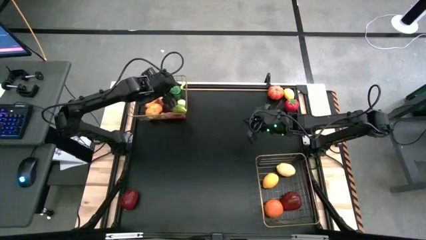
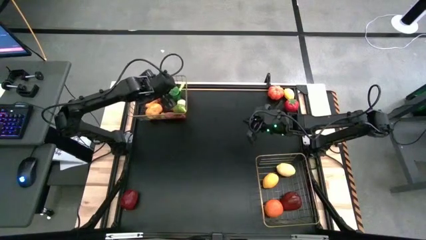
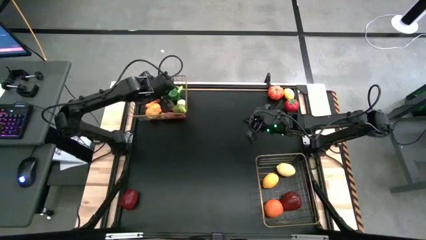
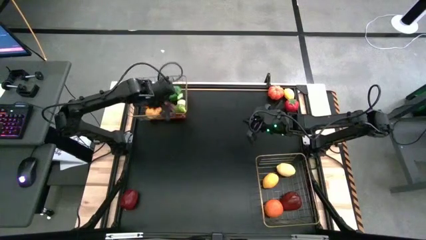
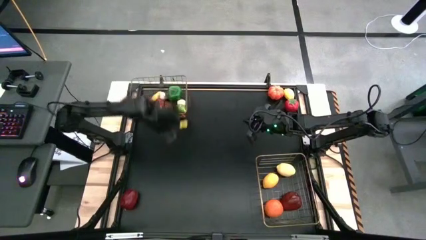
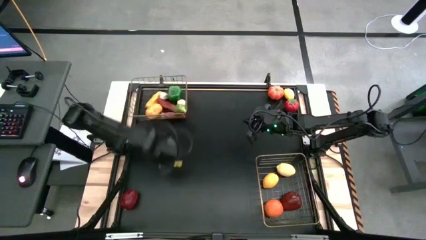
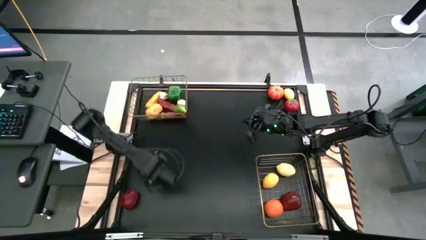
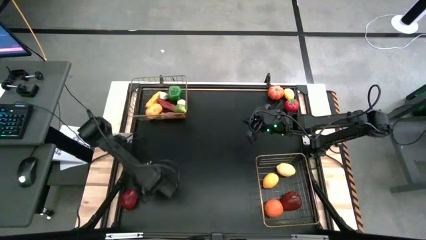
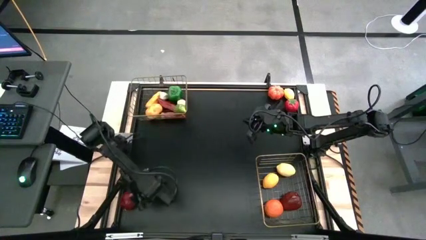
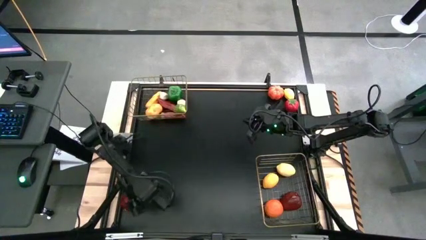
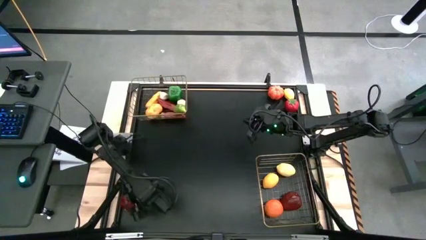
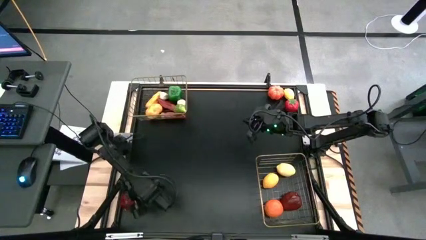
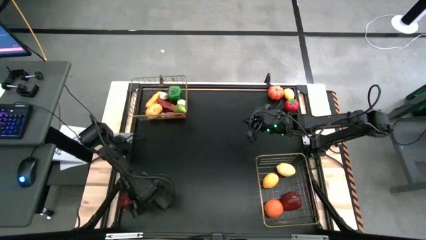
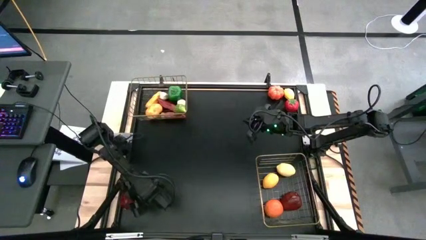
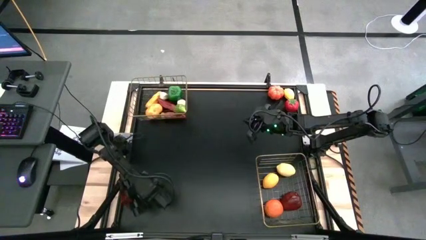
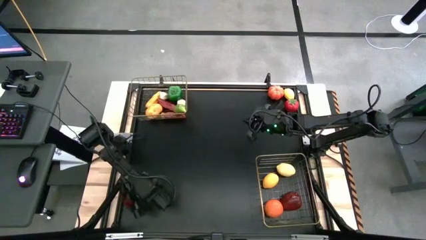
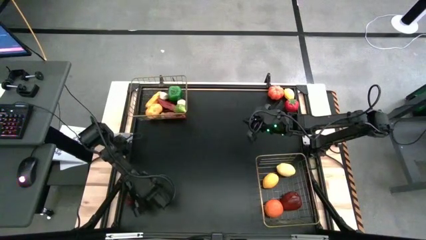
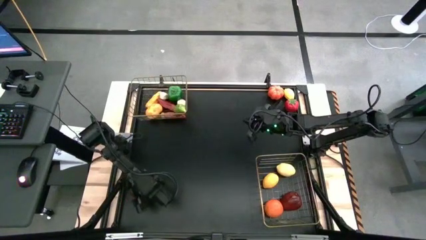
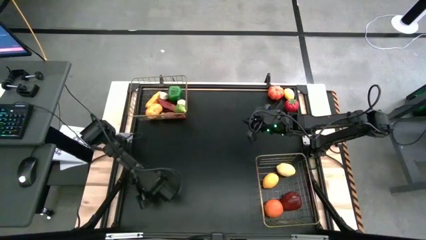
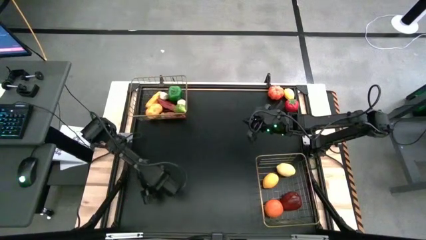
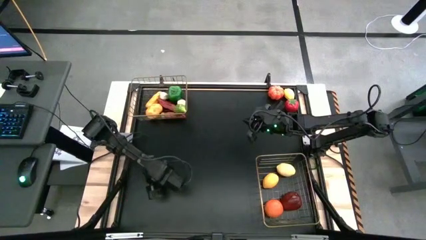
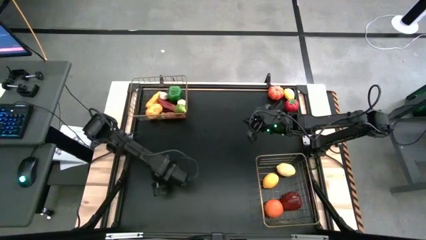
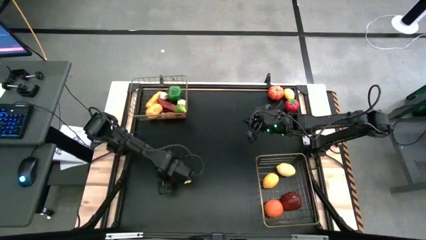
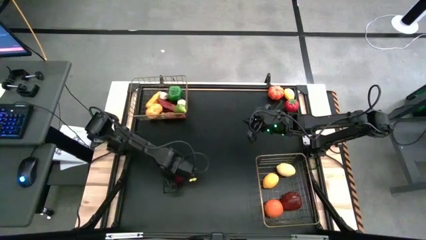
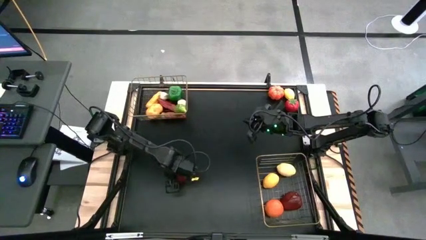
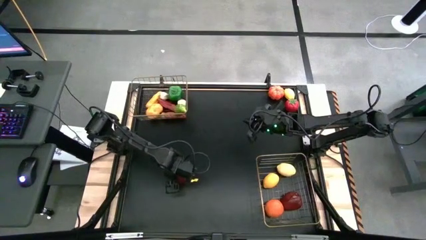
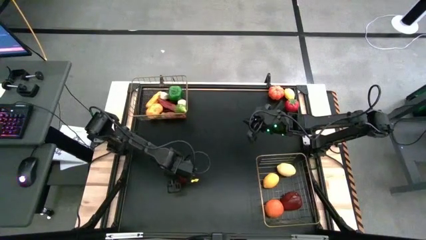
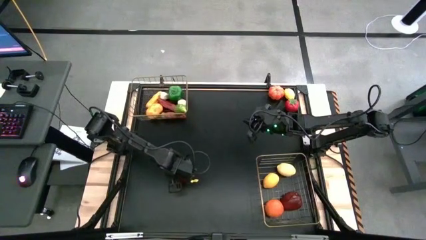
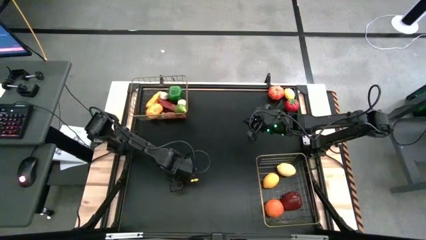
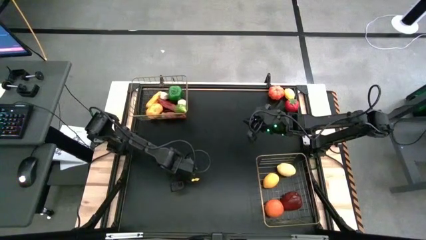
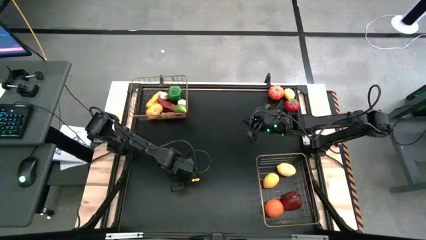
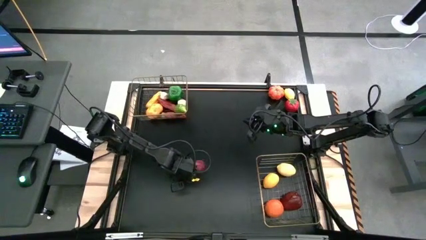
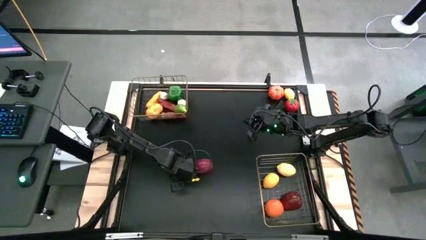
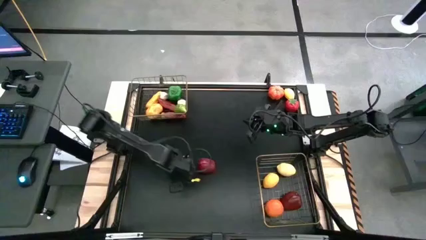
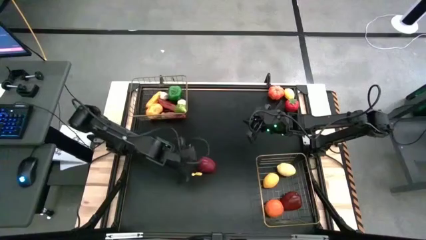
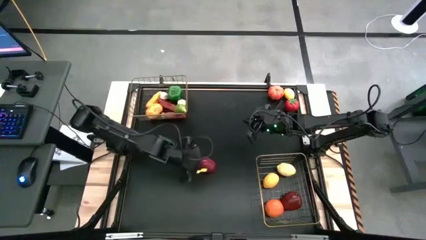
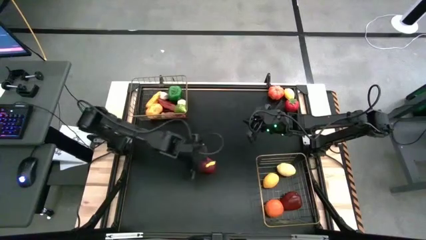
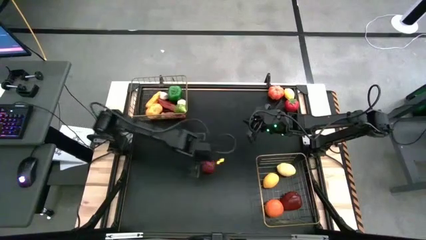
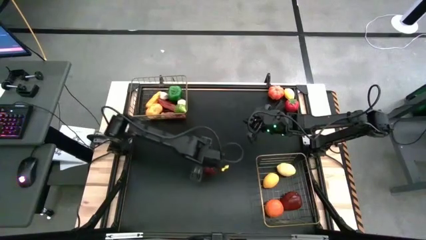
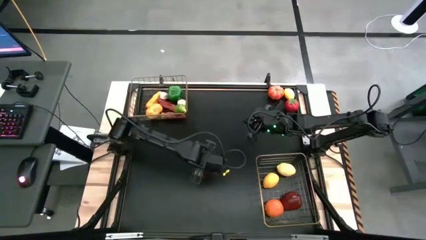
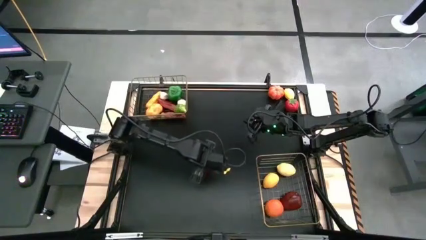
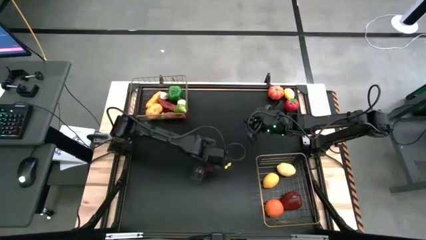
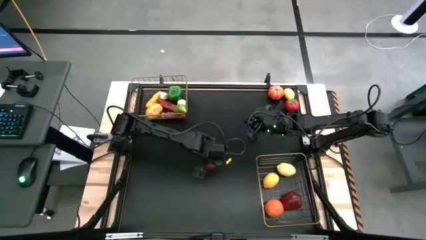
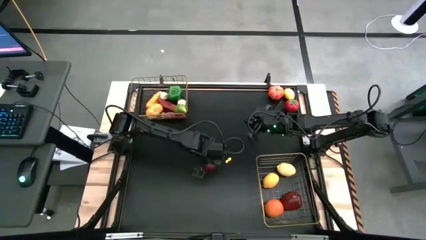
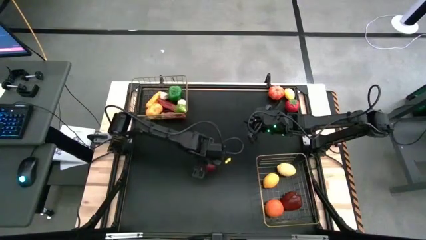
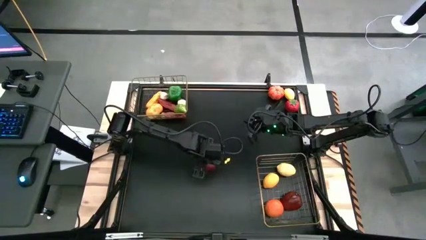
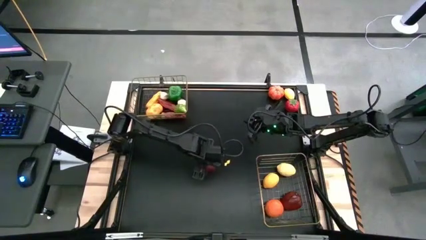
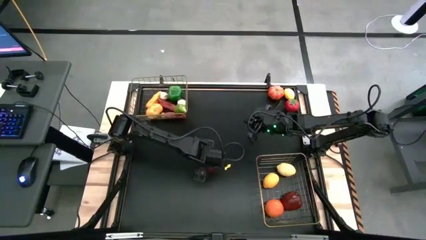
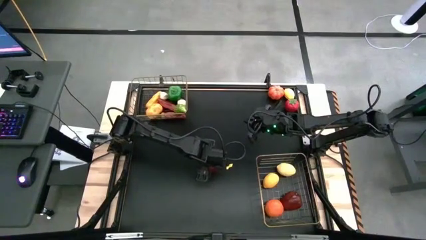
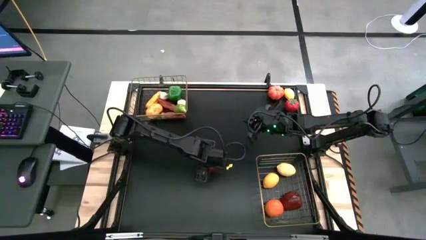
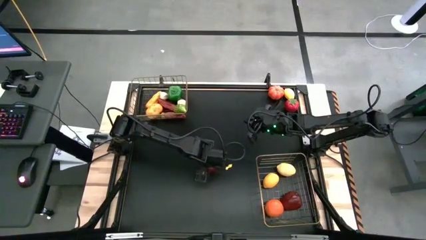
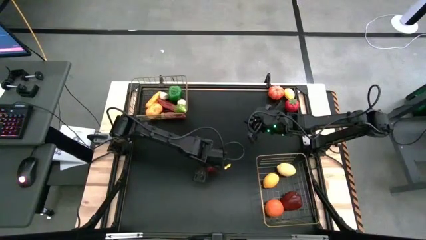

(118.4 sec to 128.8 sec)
Task: Sort produce into baskets
Put the red apple into the bottom wire basket

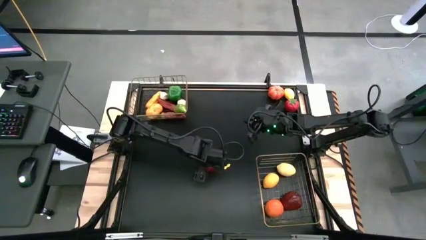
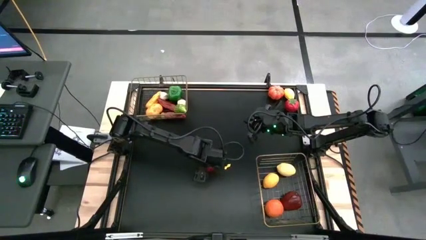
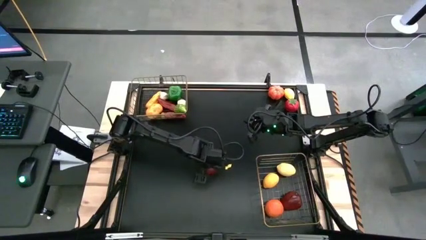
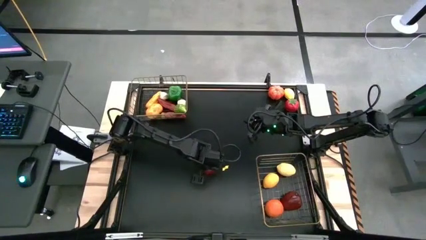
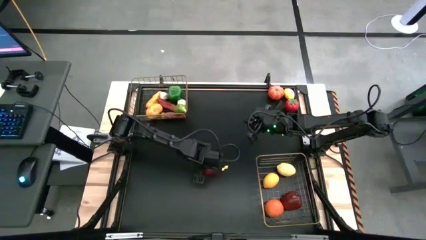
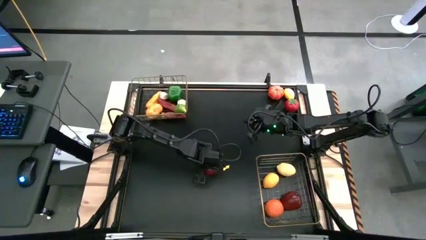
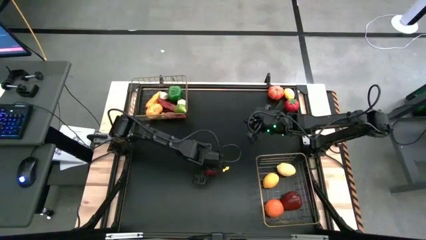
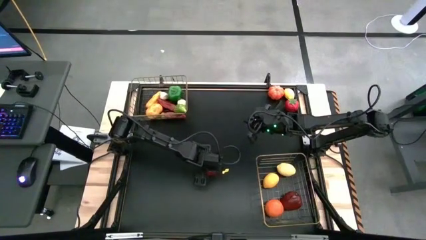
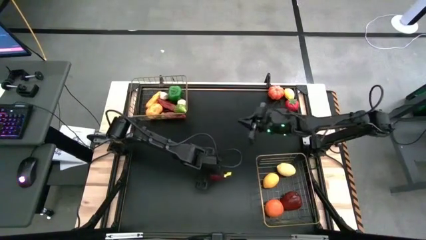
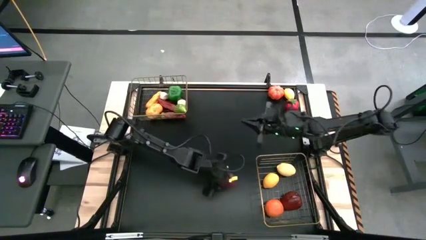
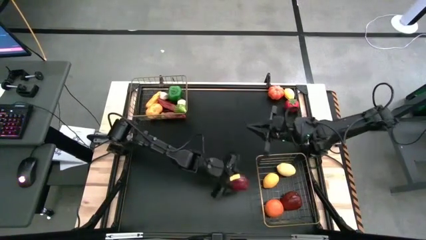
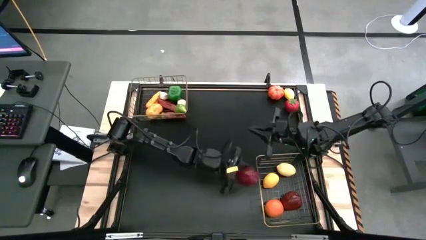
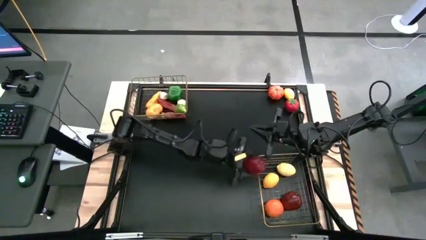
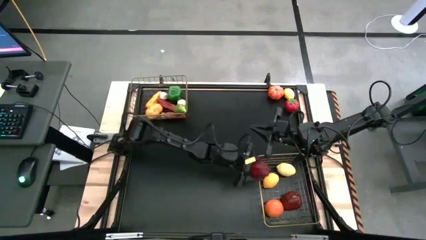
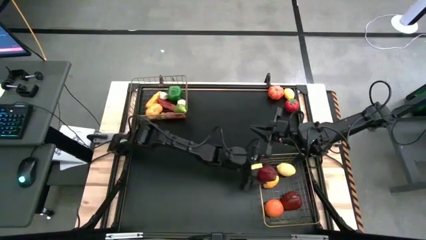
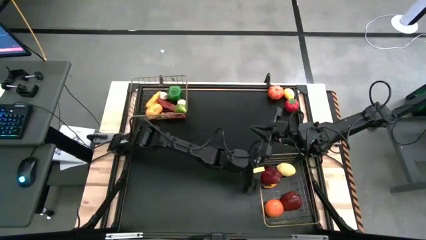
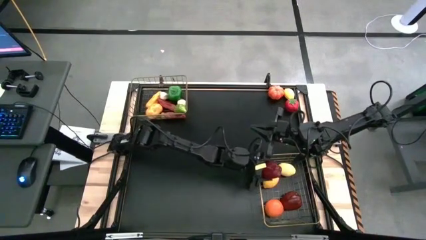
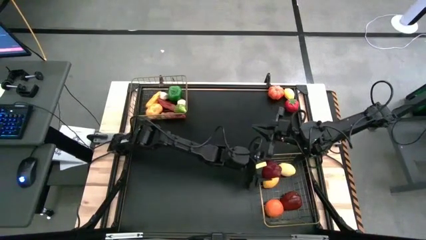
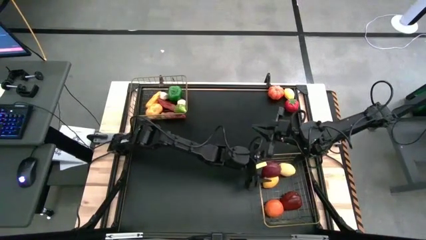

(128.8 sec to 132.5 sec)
Put the red apple into the bottom wire basket

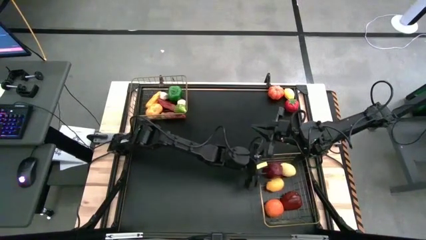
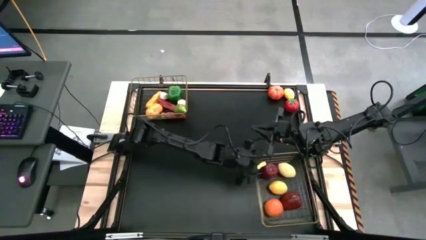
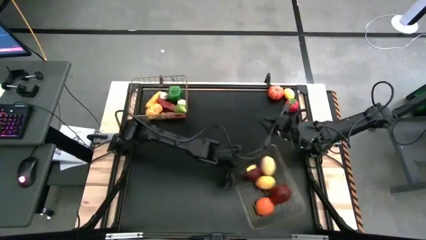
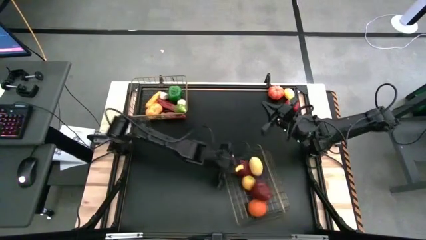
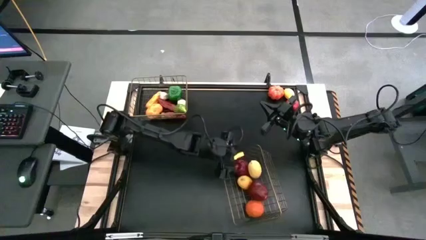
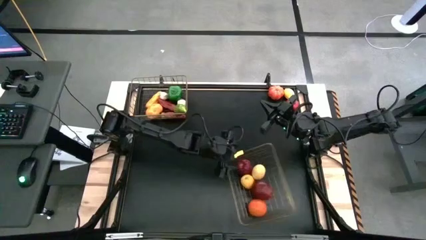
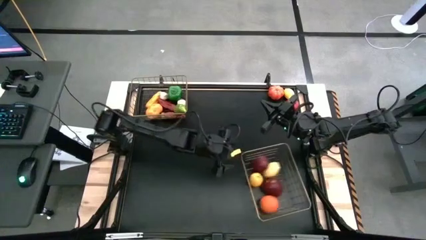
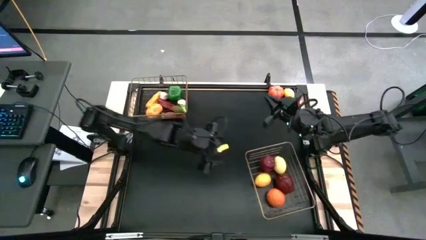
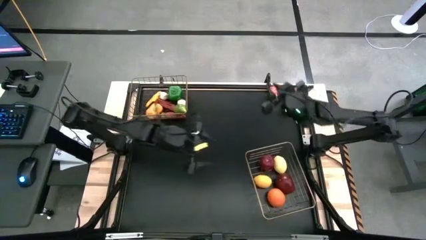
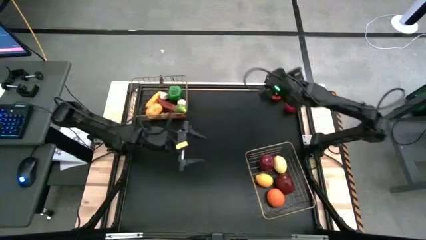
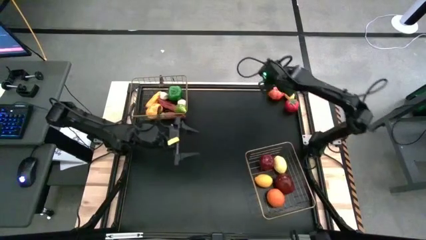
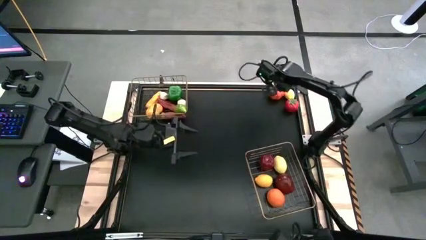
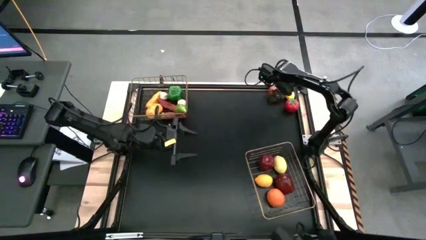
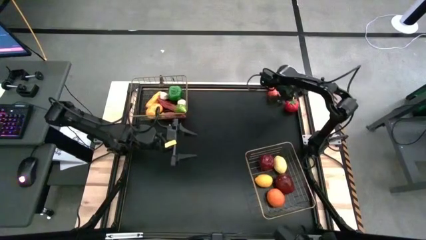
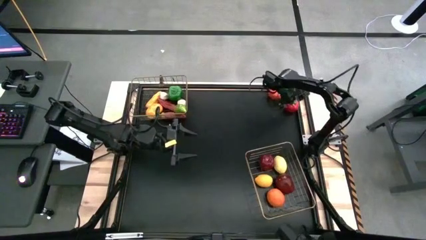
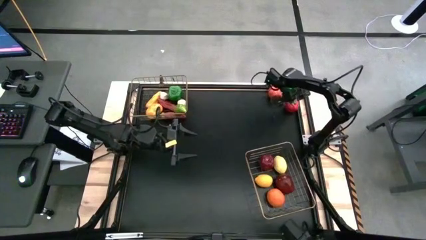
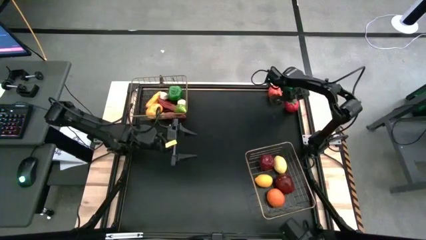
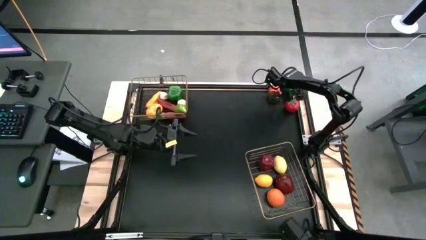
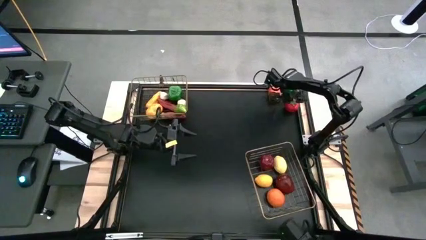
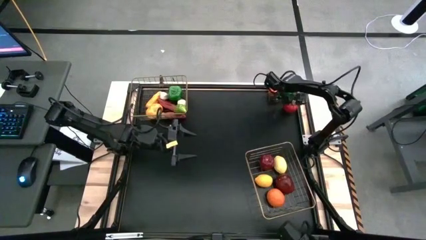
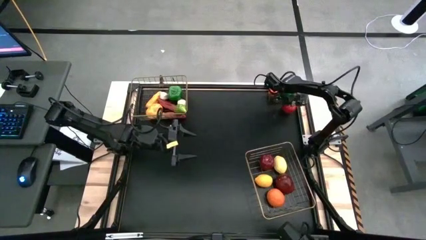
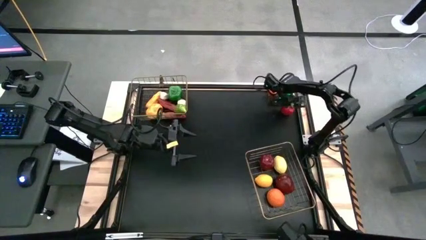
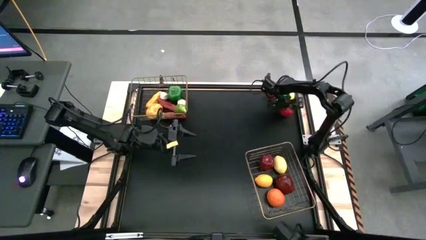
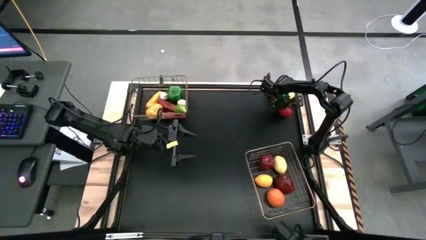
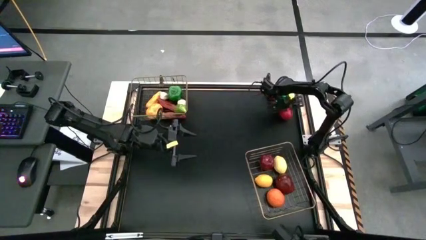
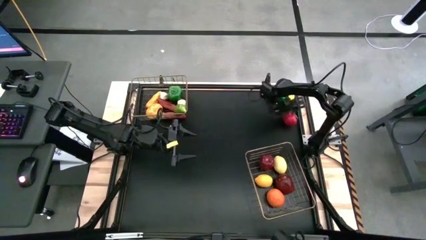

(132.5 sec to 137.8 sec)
Put the red tomato into the bottom wire basket
